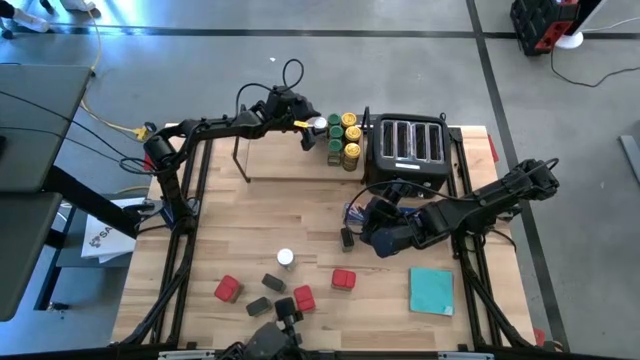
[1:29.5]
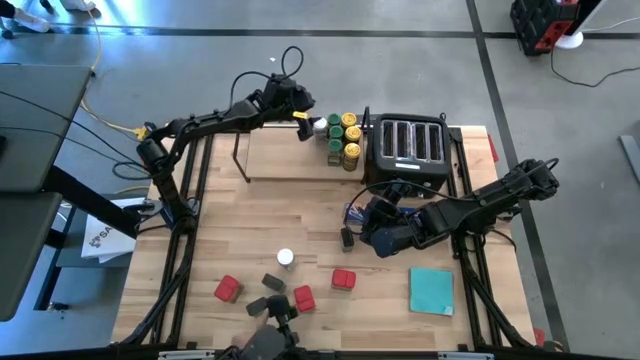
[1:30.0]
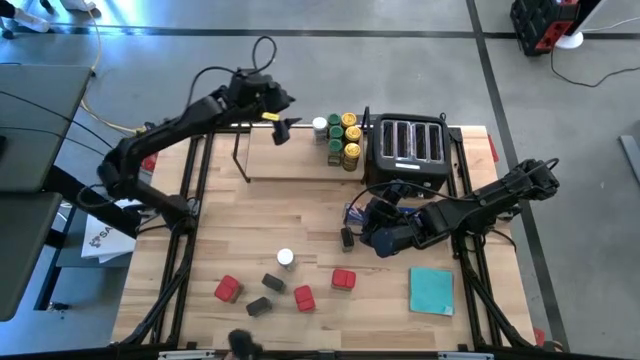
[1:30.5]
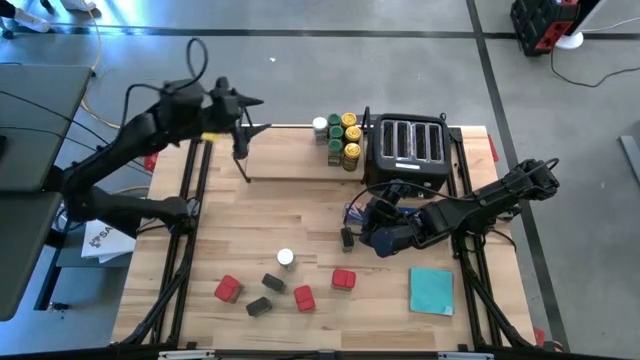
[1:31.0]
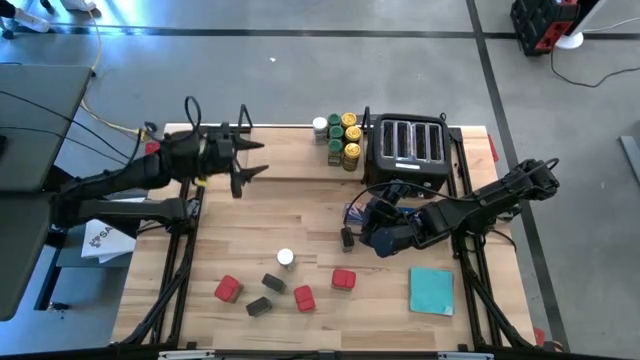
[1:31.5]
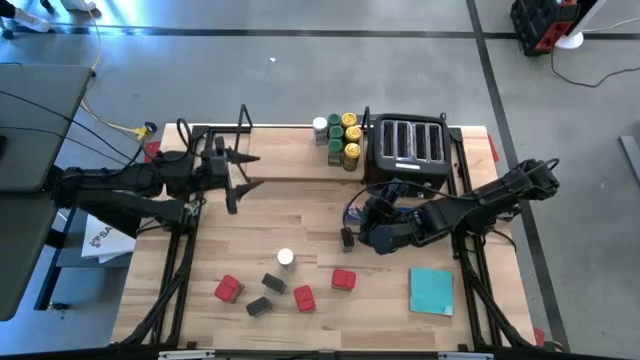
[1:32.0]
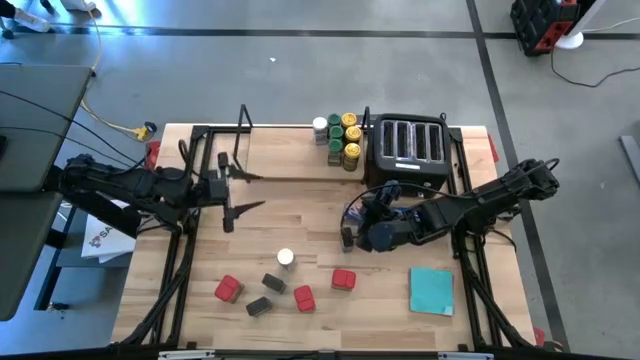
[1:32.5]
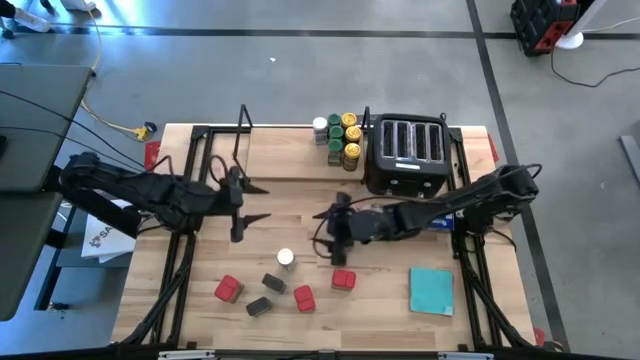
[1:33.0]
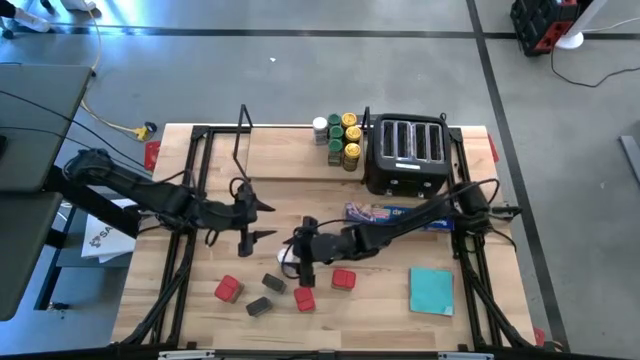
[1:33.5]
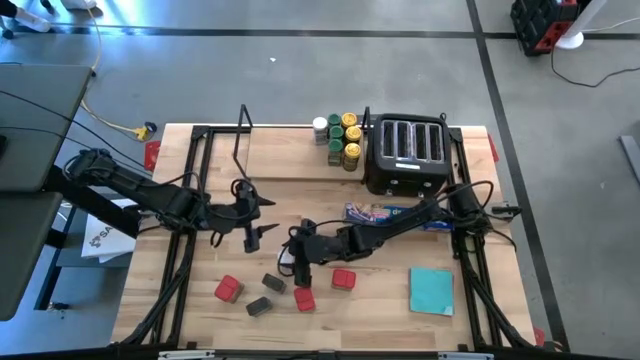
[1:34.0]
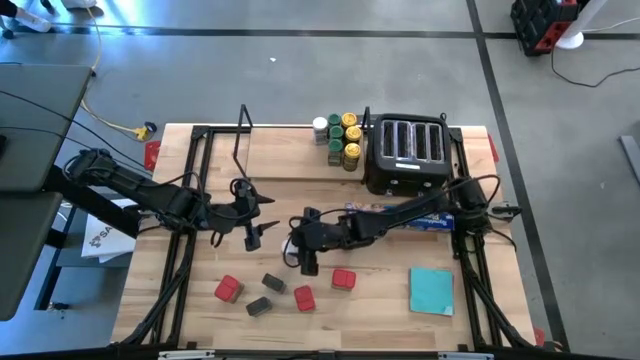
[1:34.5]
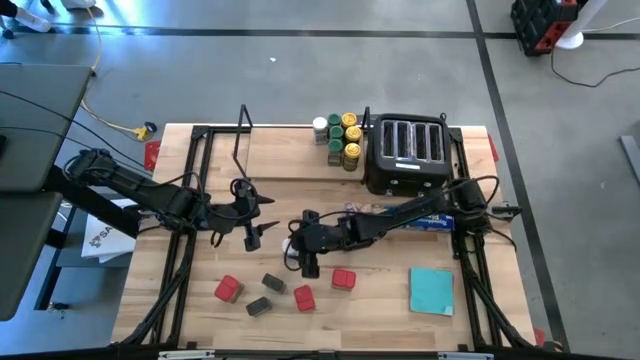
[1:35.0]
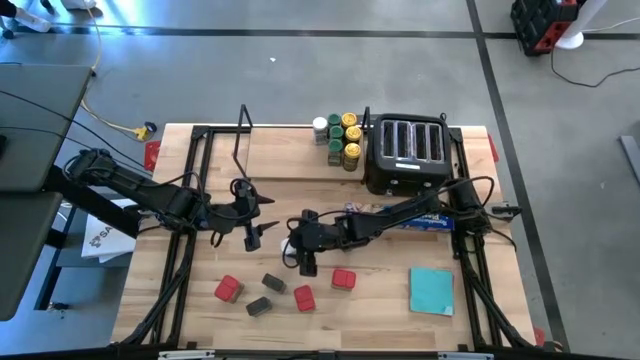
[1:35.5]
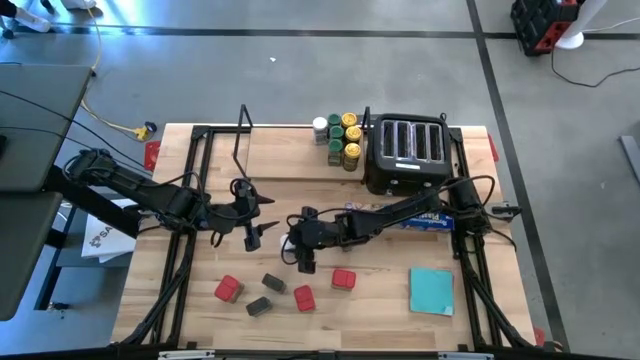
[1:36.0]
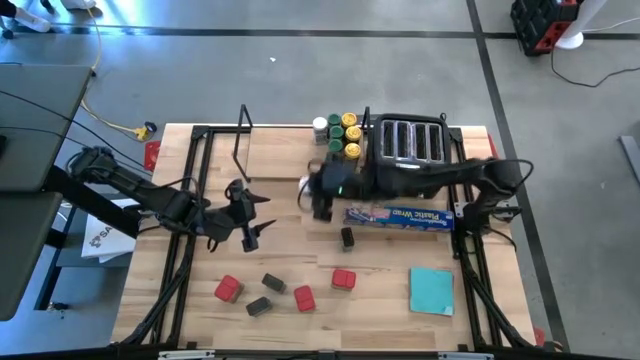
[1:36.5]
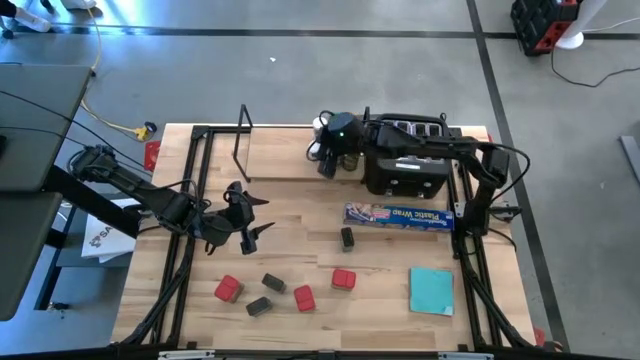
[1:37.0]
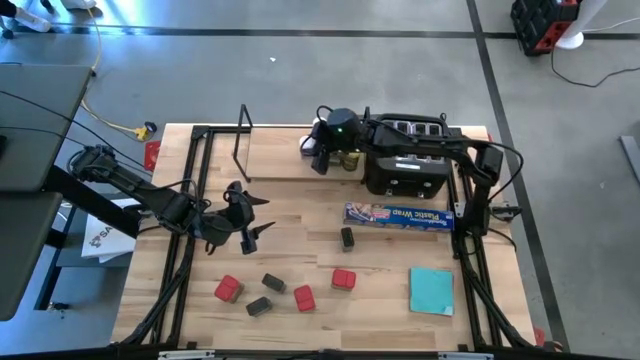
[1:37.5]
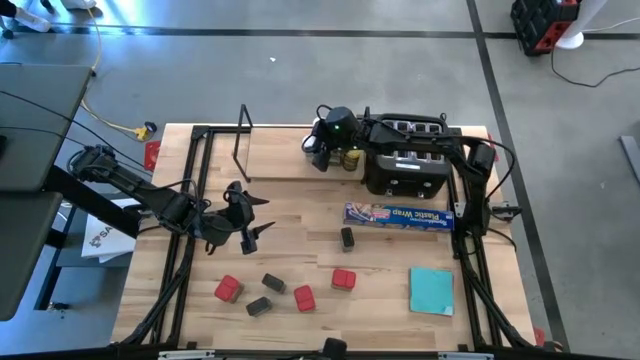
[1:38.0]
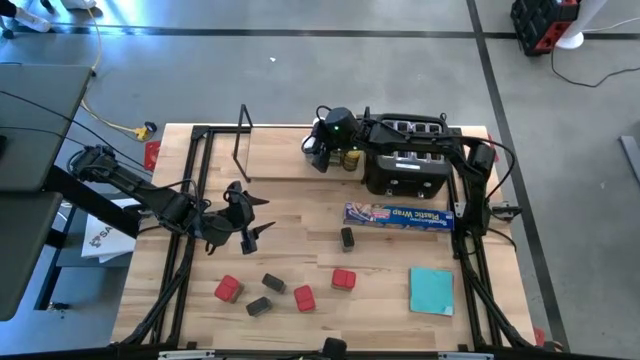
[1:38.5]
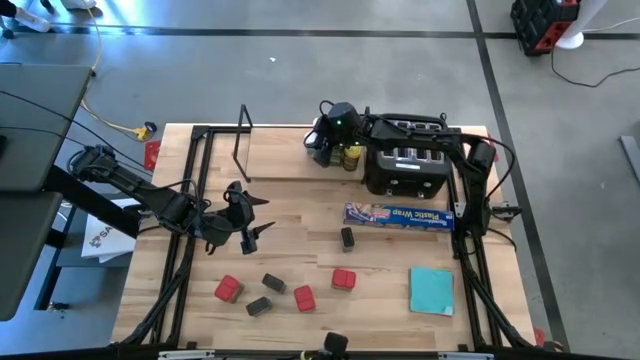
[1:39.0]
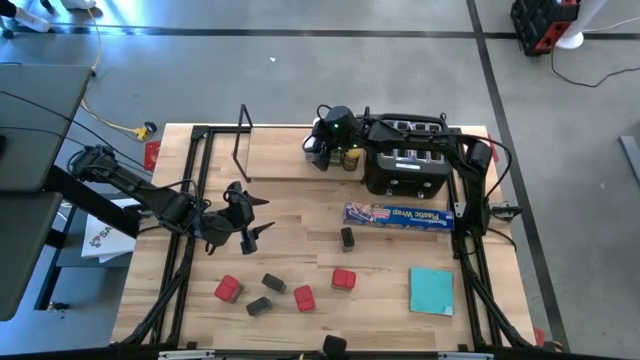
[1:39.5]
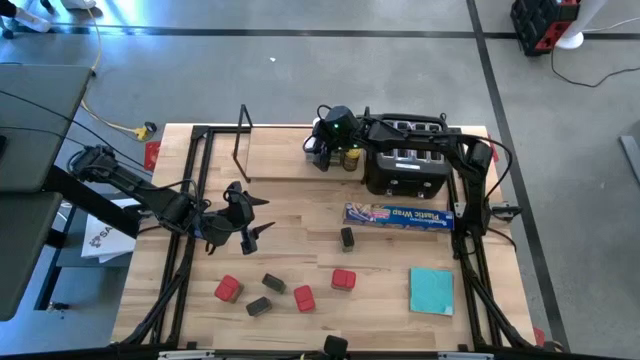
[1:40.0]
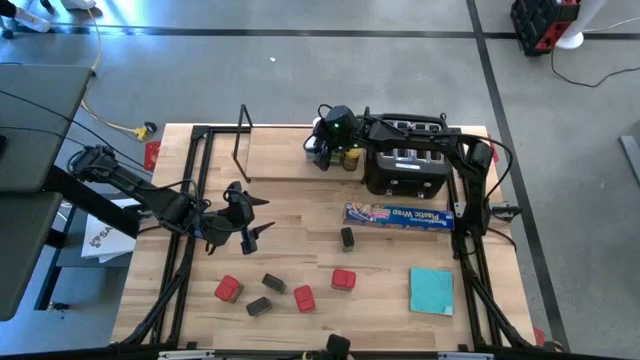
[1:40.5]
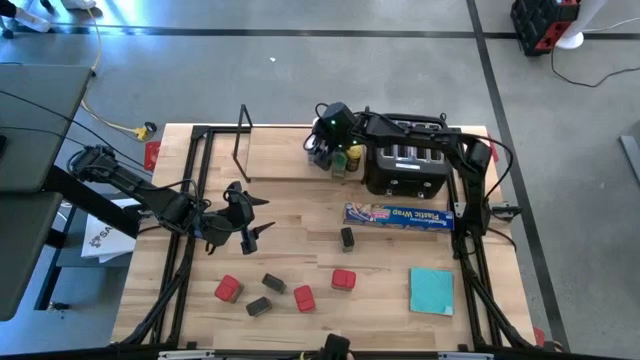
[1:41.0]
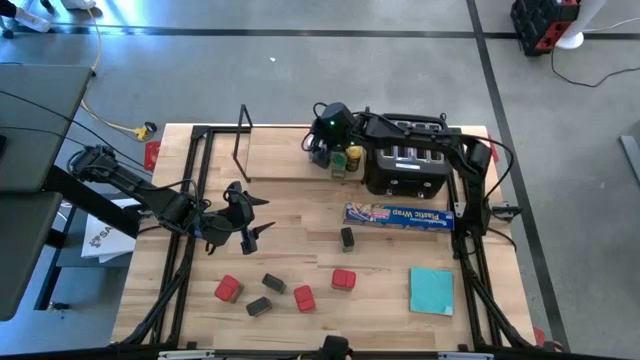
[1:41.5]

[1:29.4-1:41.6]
Task: Shelf spices
Put the white seasoning bottle on the shelf aligned with the other white seasoning bottle

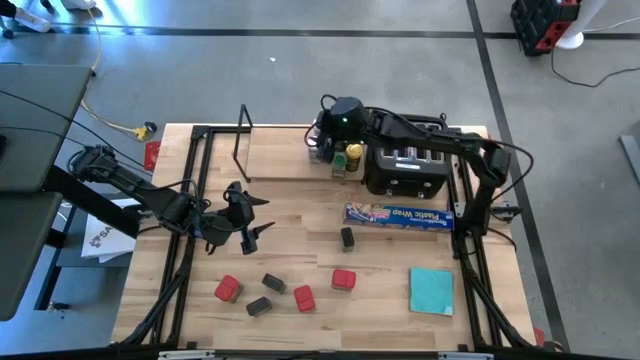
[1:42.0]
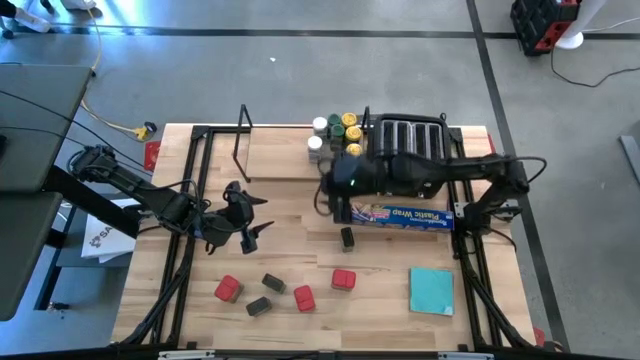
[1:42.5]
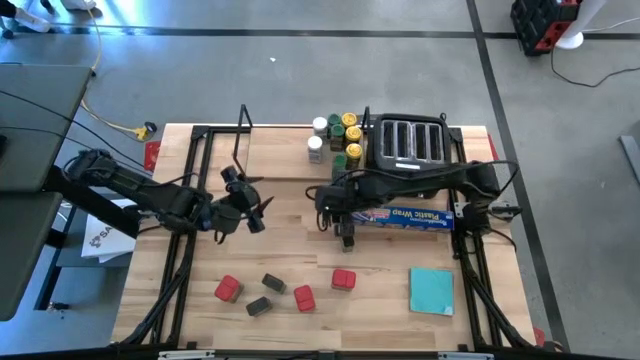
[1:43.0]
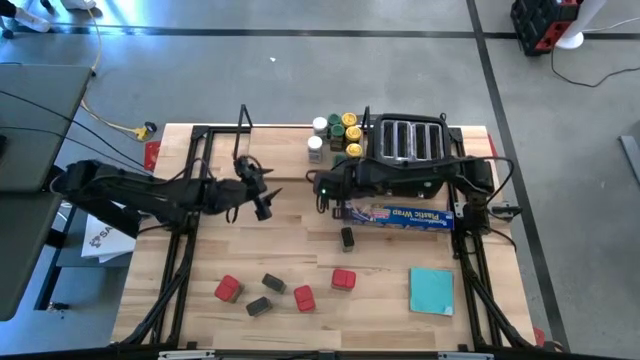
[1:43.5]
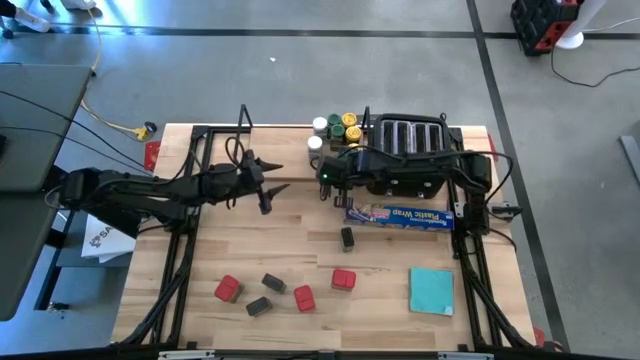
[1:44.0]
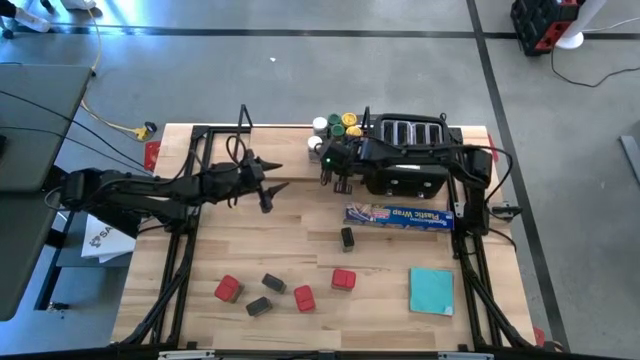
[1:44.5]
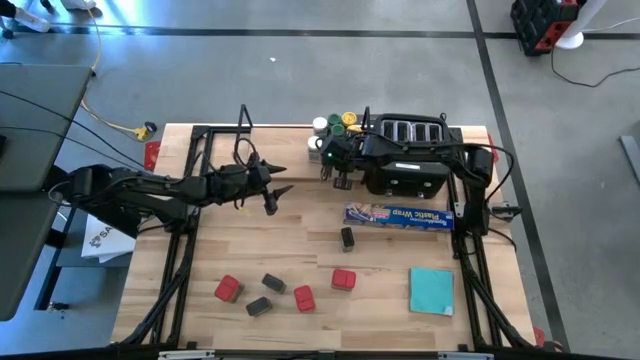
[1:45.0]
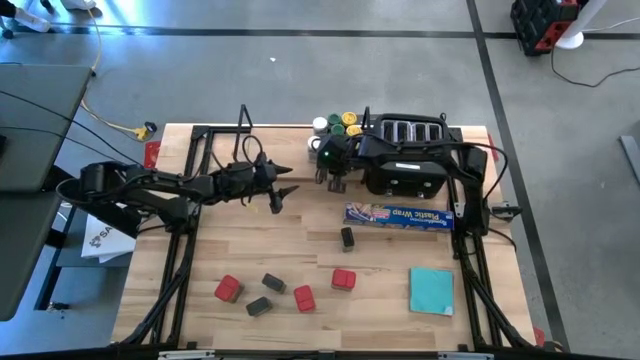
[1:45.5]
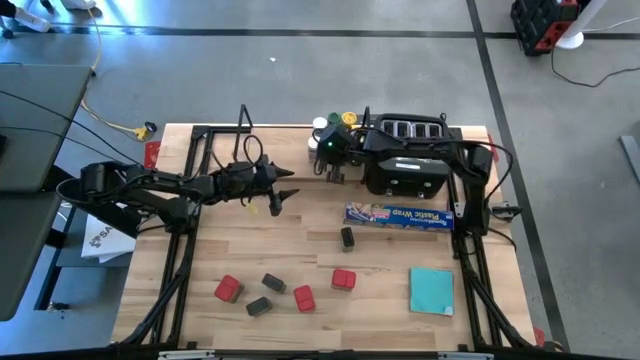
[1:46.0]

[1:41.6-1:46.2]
Adjust the green seasoning bottle on the shelf

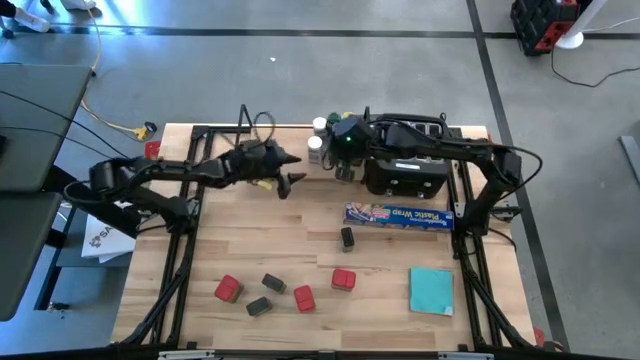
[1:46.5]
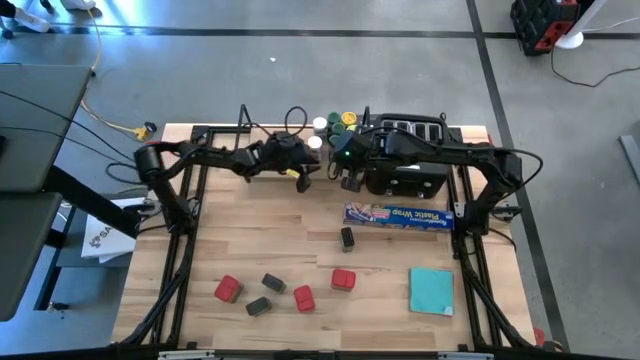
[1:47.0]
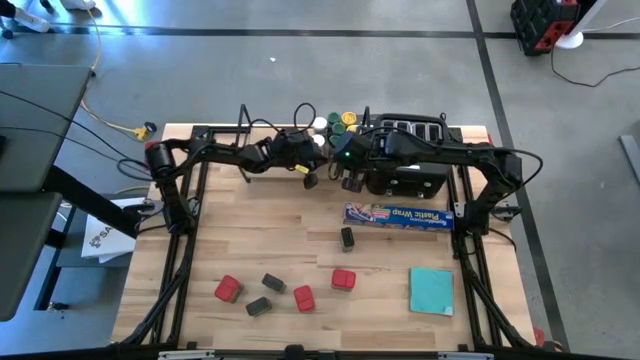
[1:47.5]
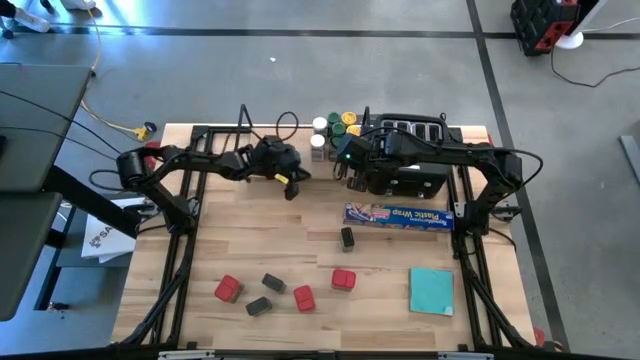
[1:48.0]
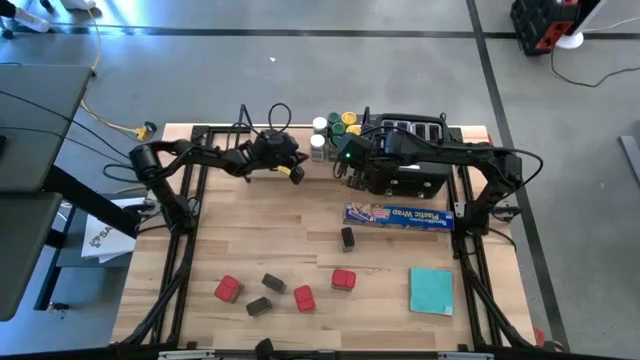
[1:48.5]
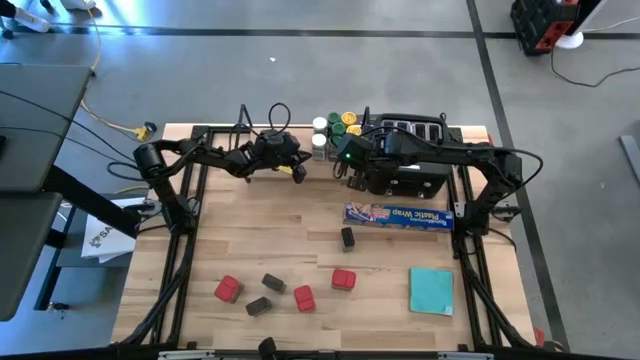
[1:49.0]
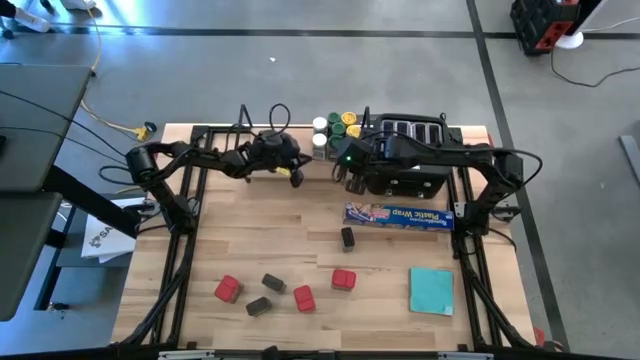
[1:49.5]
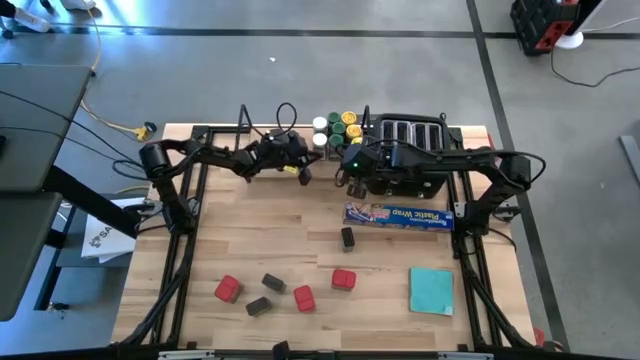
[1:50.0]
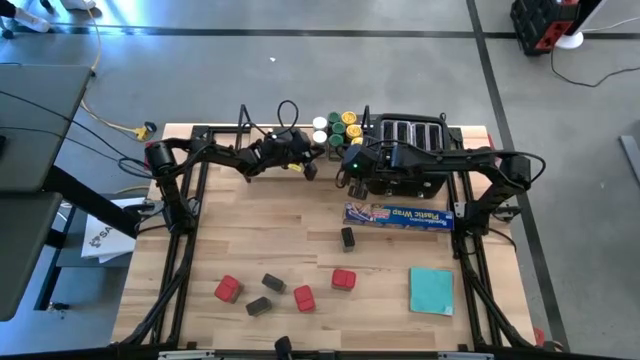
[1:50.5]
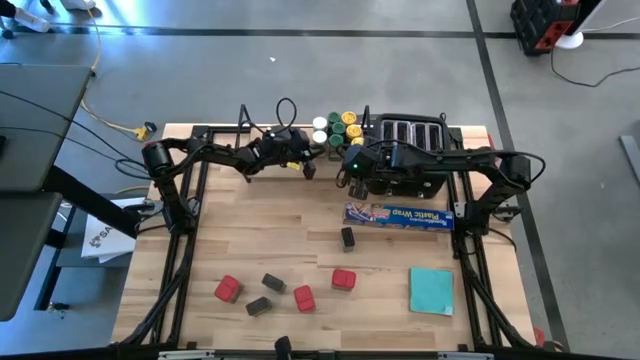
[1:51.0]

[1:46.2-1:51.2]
Adjust the white seasoning bottle on the shelf
